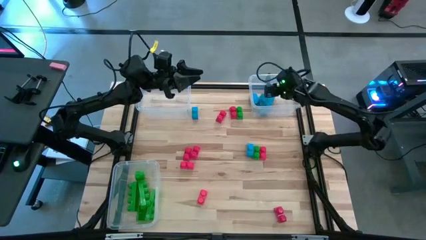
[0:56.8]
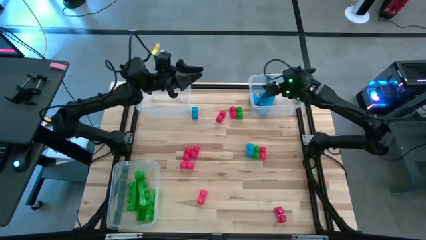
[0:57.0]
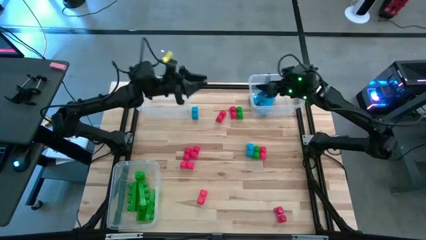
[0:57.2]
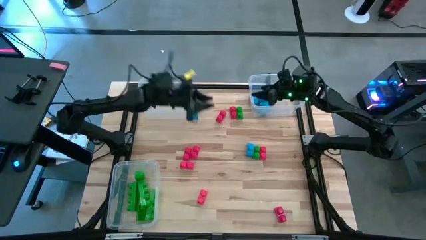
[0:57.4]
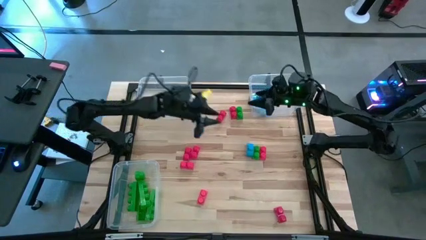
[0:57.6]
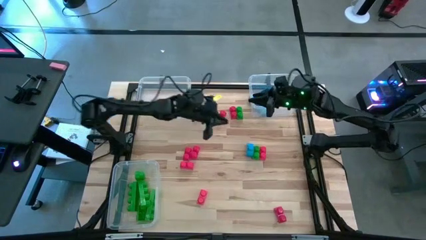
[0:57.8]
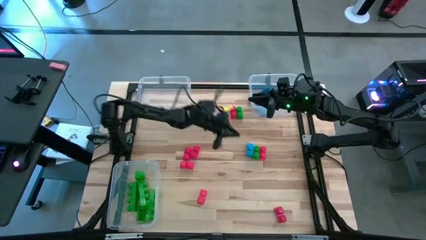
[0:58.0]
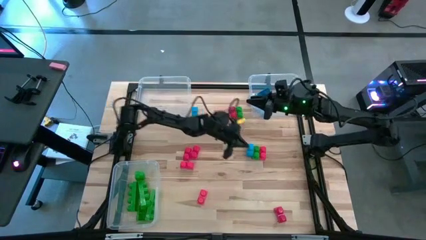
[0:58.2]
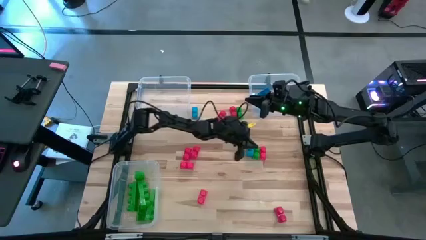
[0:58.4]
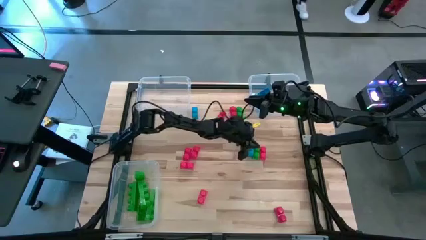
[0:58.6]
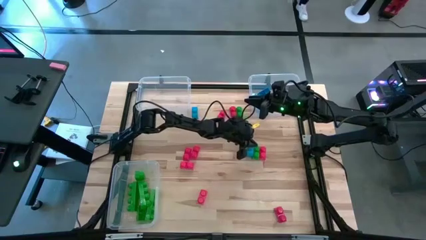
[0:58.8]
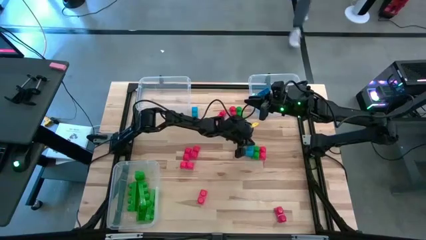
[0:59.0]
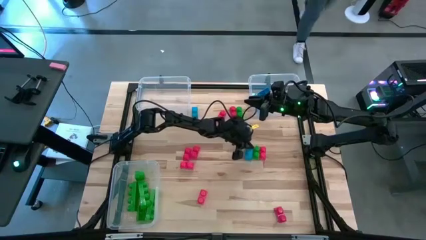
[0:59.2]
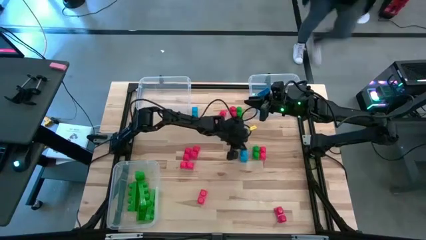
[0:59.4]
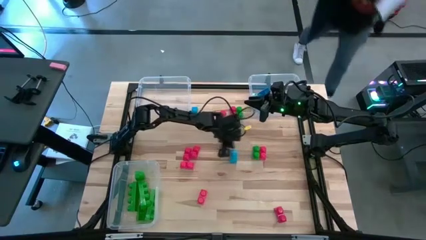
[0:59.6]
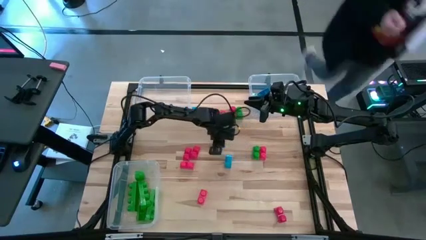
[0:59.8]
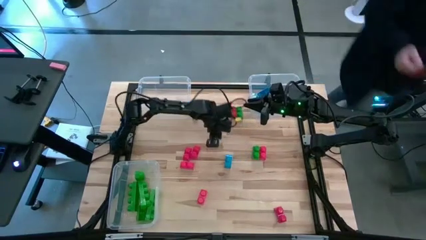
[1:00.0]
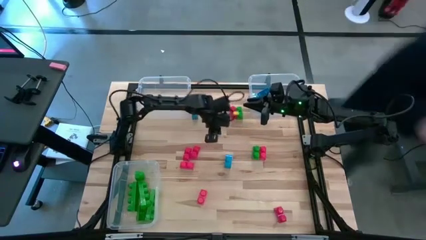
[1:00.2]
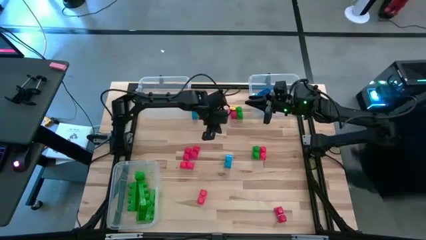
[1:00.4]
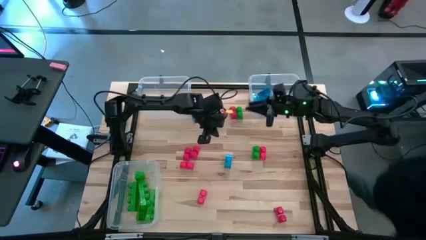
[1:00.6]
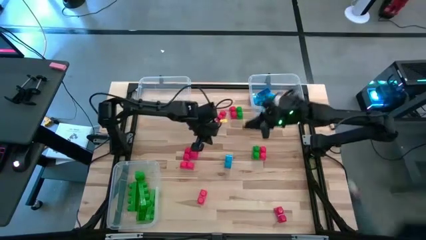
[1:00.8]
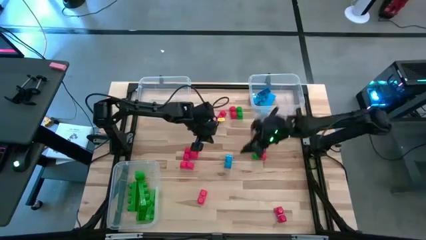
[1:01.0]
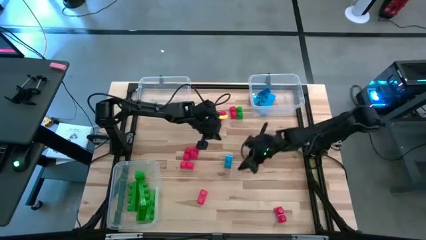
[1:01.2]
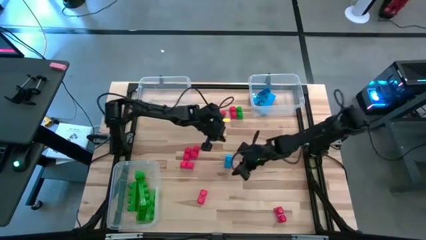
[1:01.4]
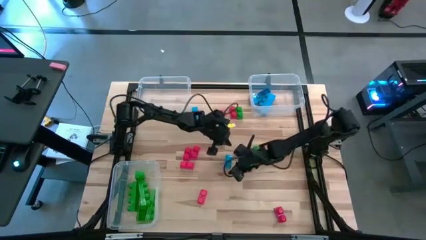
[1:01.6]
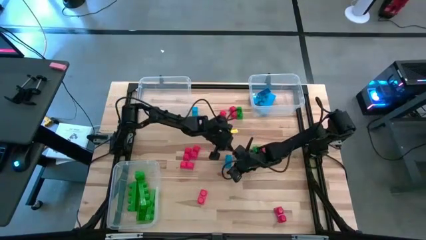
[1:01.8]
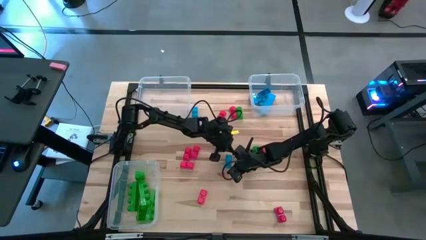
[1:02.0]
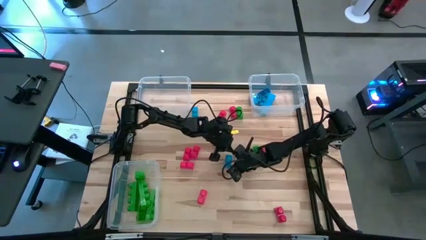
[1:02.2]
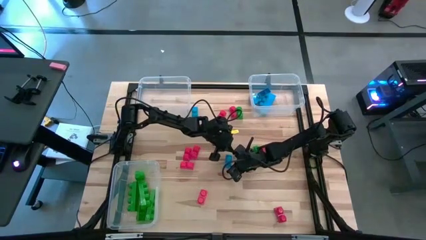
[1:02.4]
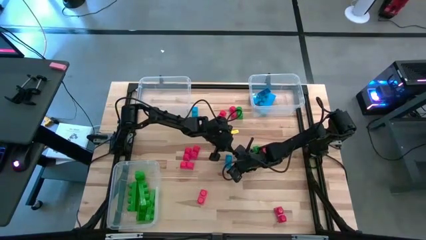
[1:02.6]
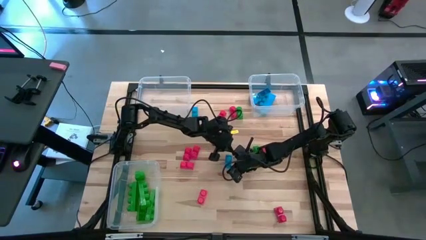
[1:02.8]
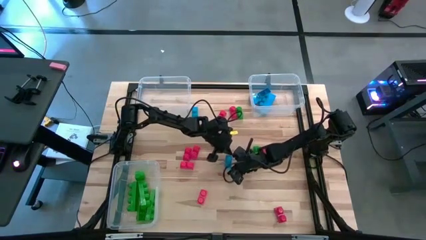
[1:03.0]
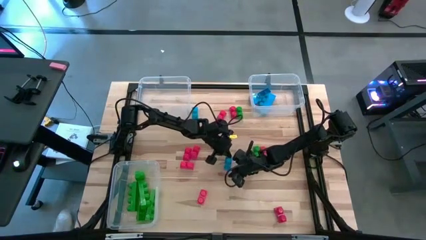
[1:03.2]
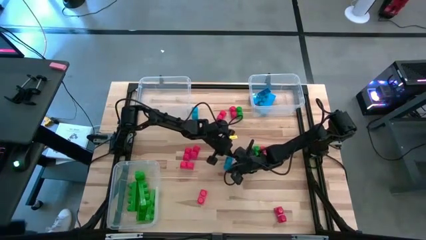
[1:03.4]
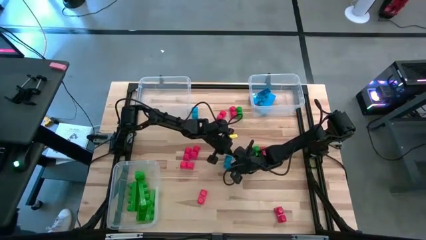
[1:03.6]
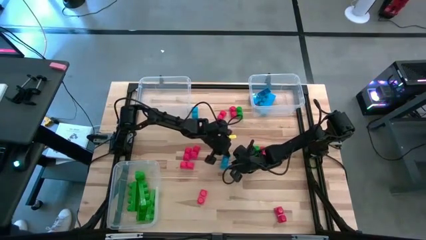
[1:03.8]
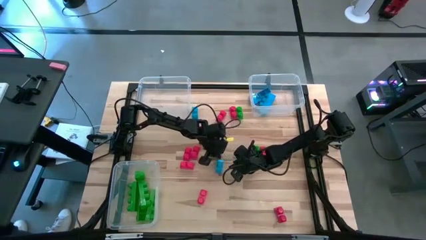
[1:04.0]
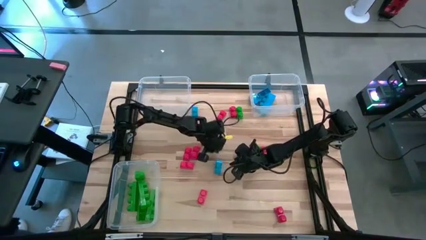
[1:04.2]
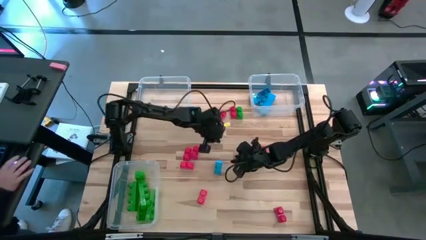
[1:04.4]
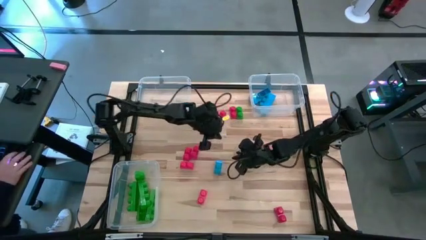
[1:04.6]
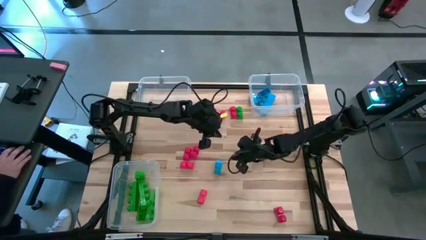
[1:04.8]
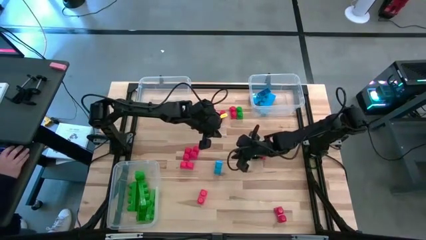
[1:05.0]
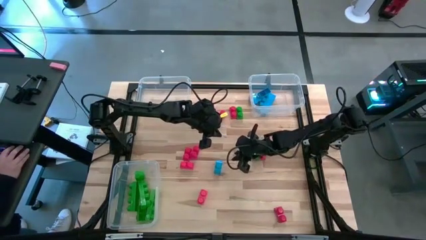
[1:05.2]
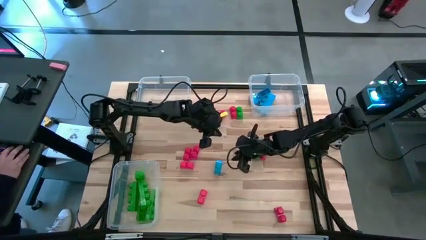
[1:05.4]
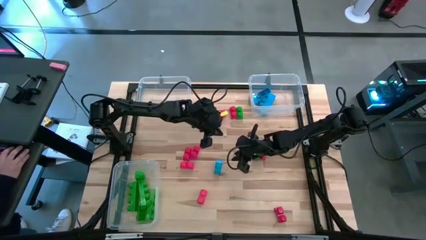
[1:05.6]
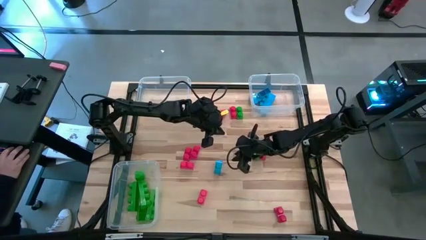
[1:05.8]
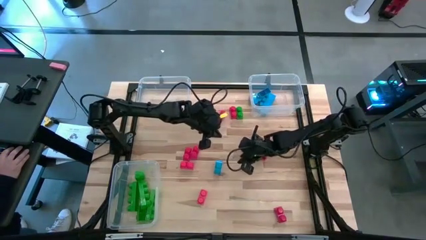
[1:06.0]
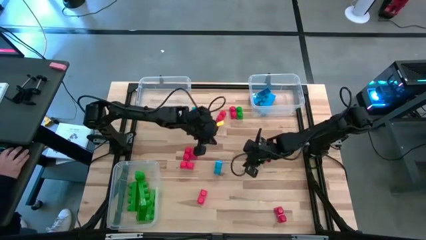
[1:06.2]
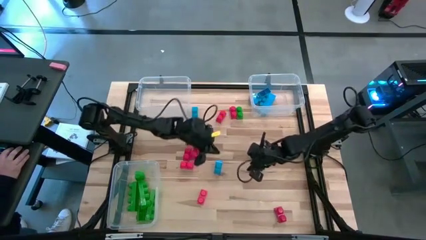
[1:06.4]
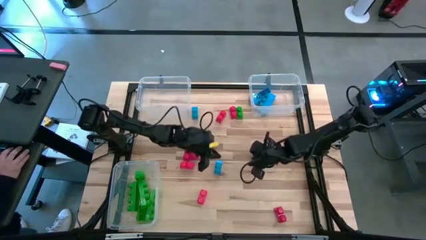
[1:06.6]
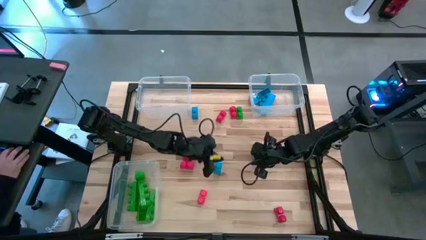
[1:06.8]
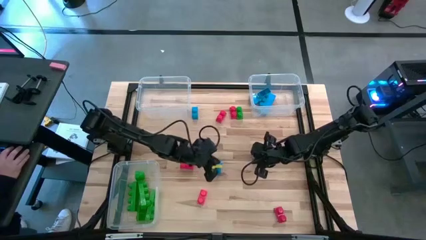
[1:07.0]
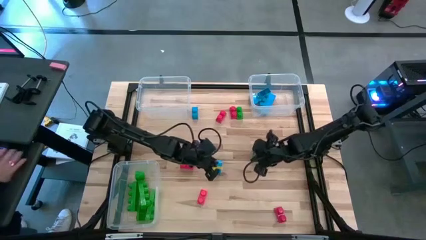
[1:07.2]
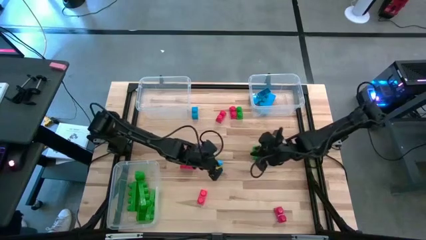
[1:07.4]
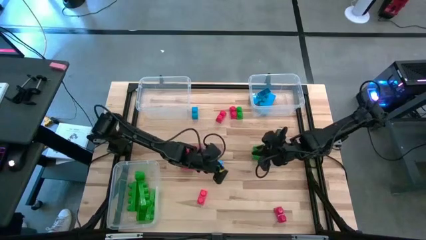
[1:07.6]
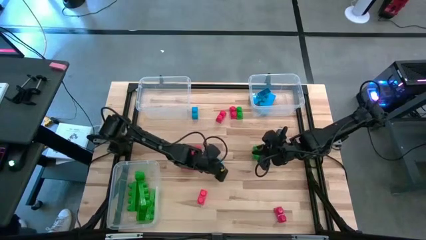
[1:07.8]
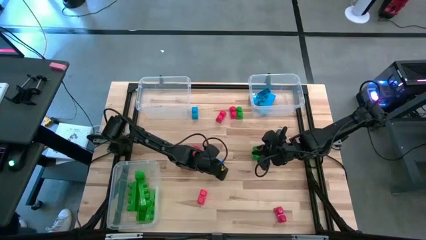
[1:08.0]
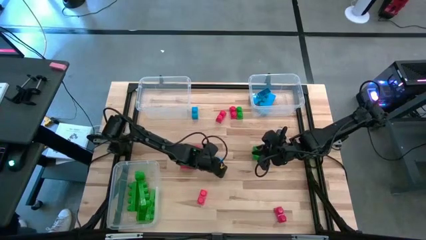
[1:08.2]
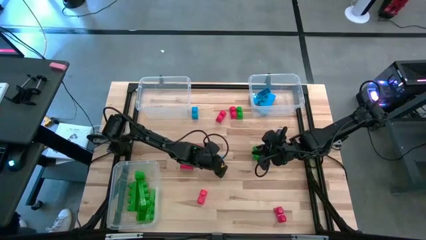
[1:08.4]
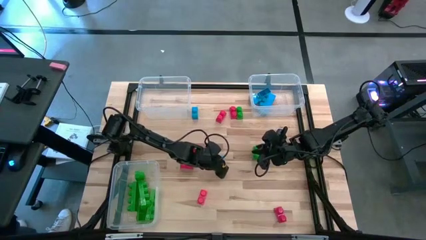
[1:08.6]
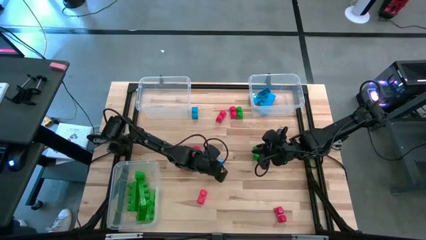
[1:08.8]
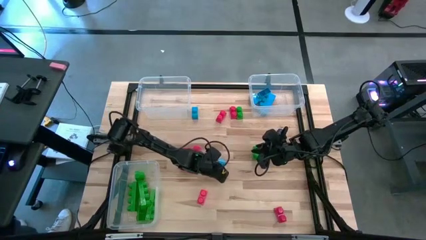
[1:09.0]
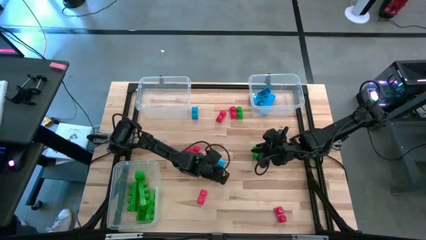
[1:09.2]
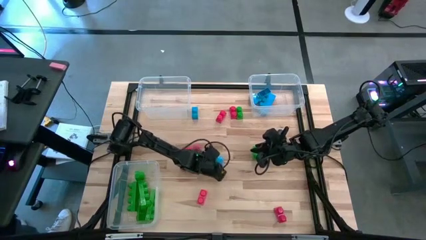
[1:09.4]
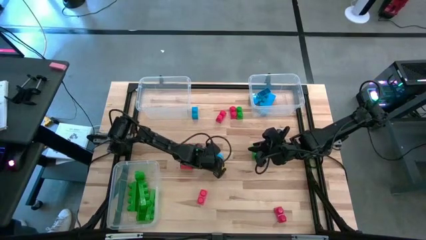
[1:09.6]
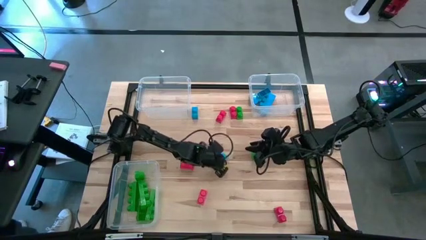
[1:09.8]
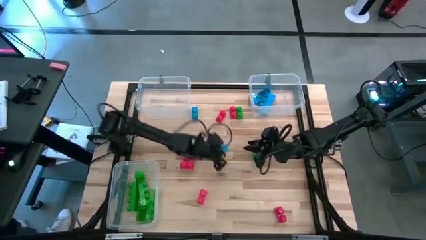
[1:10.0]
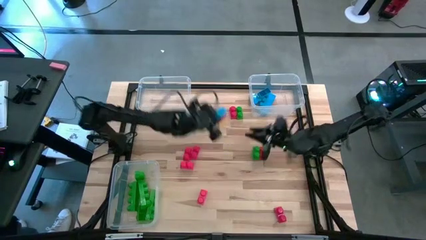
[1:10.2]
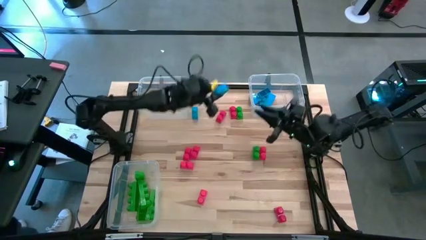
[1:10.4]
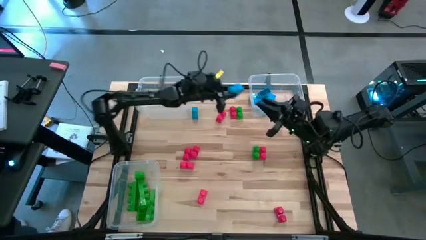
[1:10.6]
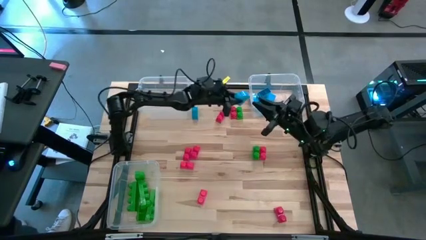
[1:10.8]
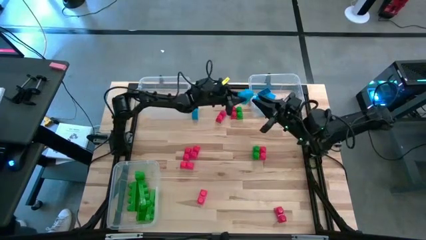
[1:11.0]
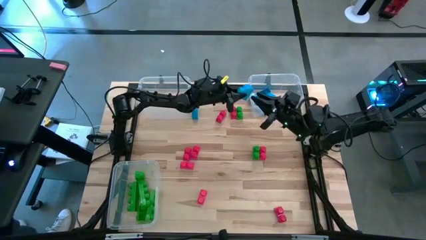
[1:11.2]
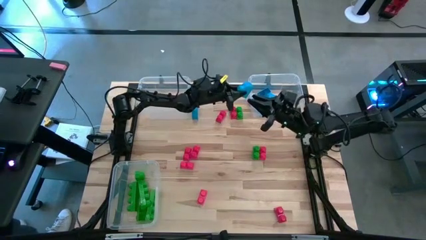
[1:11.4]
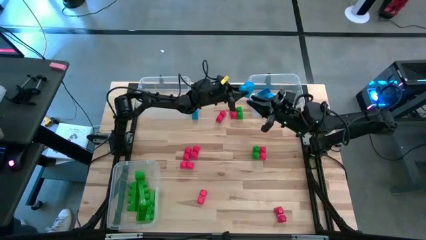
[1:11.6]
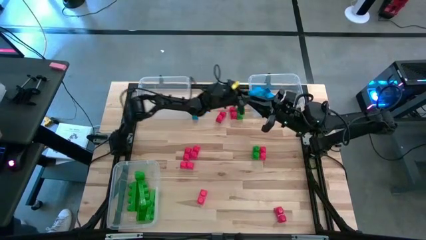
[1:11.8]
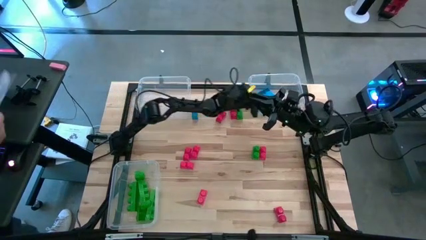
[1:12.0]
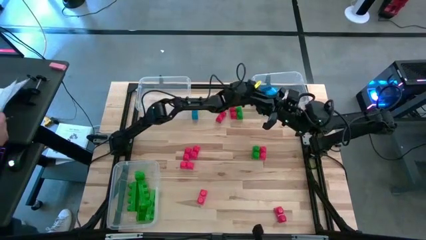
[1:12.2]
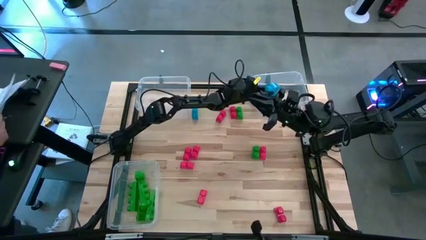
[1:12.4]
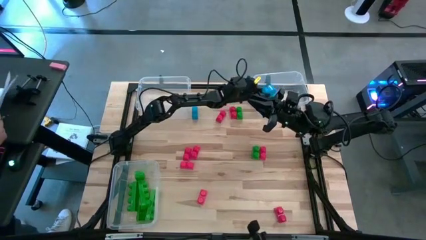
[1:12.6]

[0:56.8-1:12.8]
Task: Sort blocks
Put the blue game piece into the top right transparent bin
